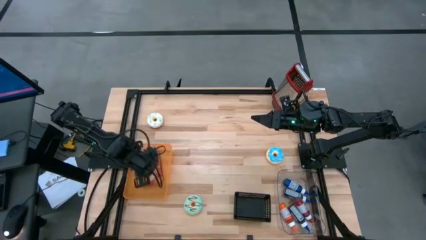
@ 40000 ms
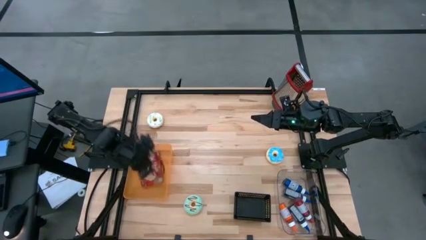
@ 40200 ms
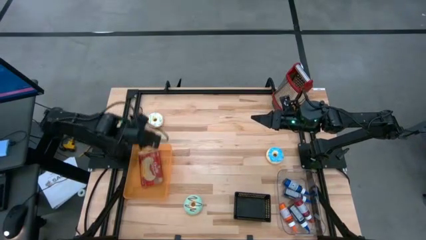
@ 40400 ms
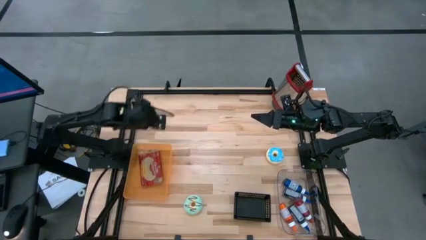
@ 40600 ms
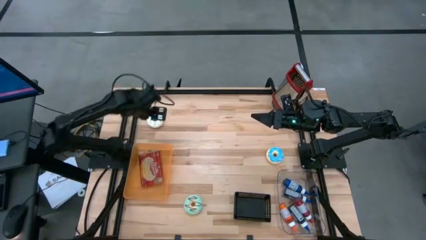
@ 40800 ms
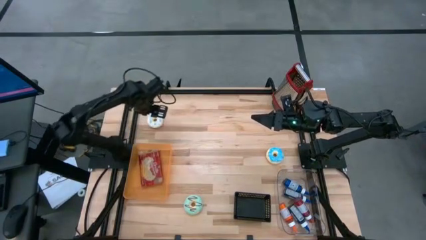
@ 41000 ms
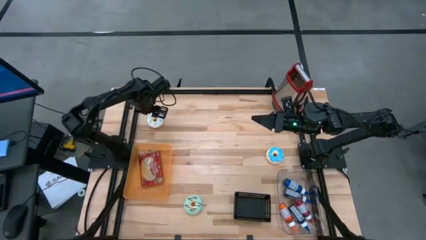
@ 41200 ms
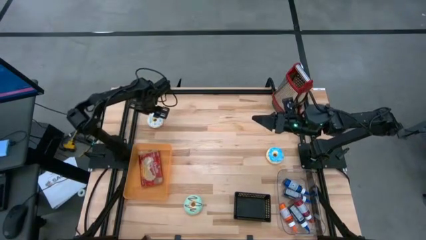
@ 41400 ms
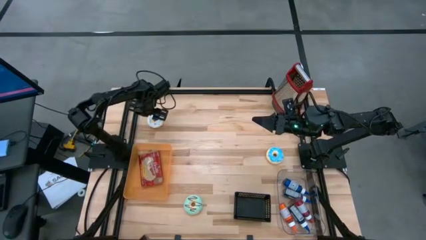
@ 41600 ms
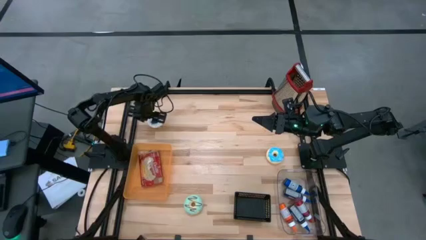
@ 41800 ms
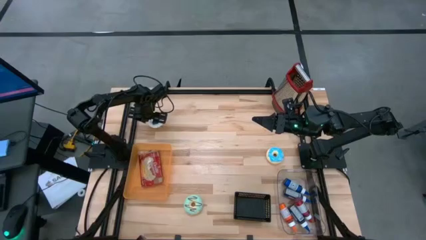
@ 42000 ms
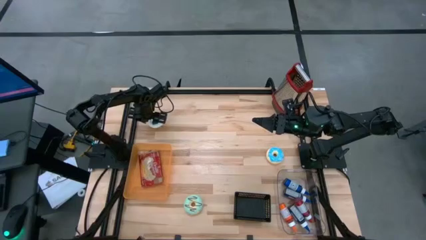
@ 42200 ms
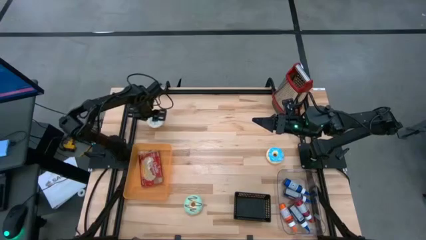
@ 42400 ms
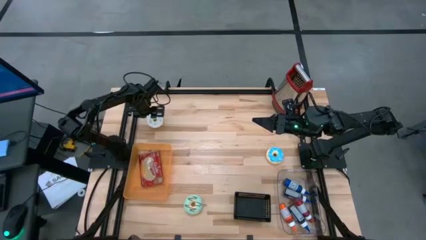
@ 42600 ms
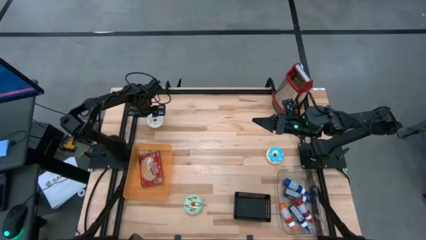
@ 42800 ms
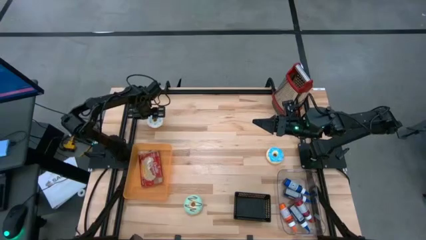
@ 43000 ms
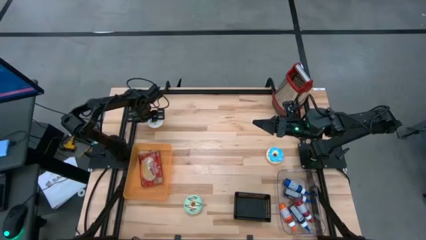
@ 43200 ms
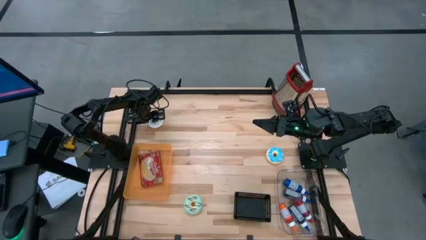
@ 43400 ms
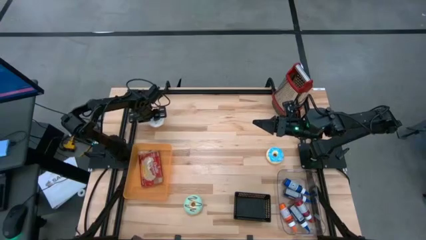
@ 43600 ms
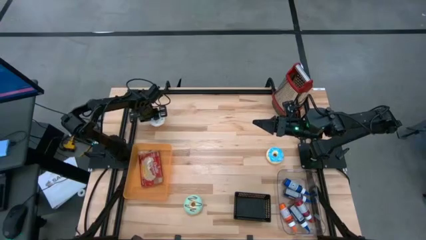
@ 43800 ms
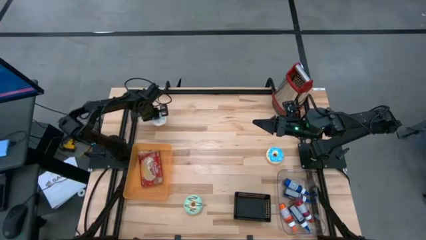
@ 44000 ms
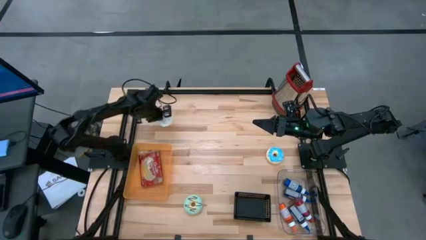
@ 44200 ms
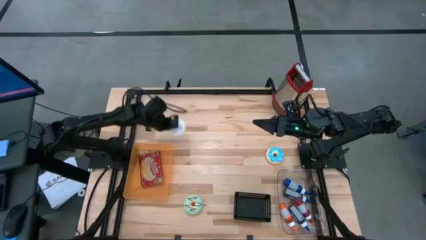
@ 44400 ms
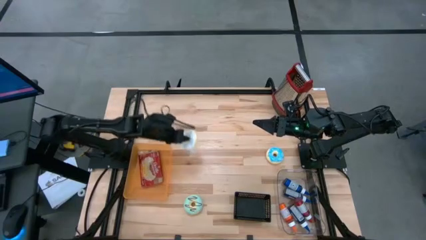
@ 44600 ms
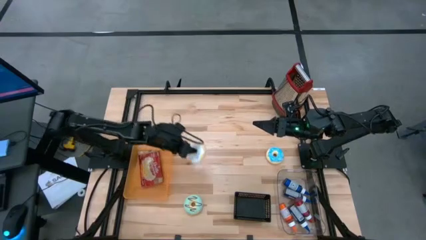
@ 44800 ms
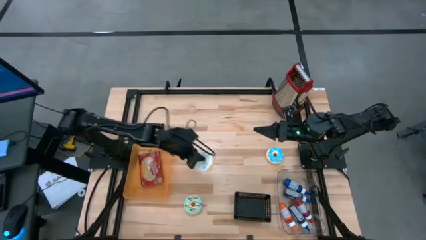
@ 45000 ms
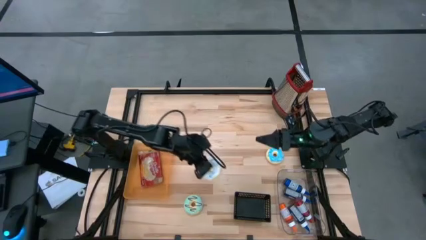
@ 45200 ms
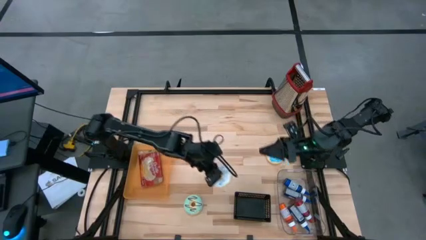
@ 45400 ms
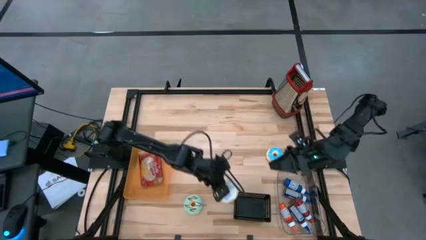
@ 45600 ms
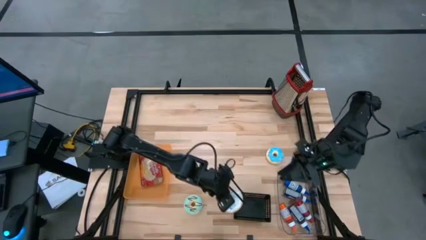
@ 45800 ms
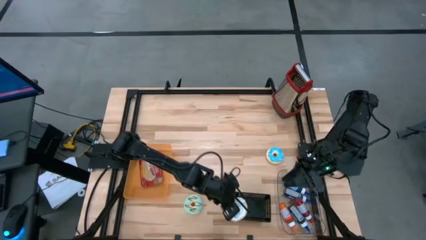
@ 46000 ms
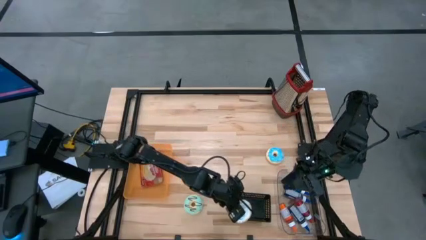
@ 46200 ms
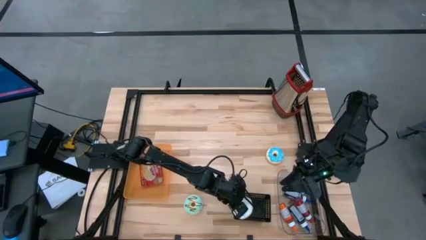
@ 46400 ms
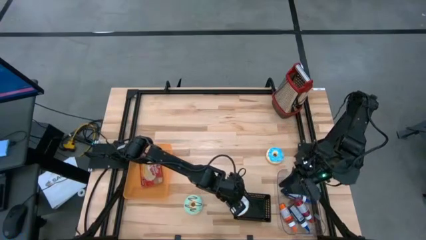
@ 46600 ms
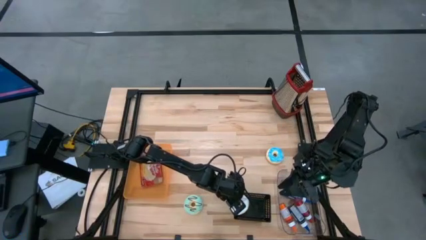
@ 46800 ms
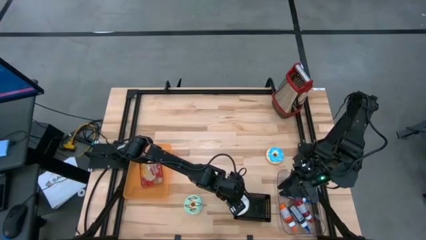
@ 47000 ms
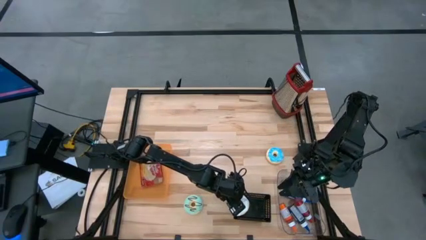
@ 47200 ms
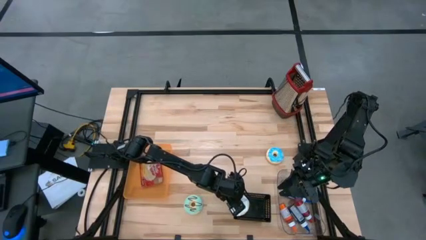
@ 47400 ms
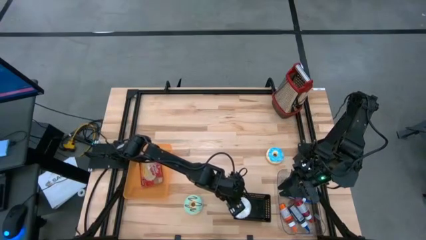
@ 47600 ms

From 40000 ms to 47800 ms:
Task: Pick & Place Food Item
Put the white donut into the black bin

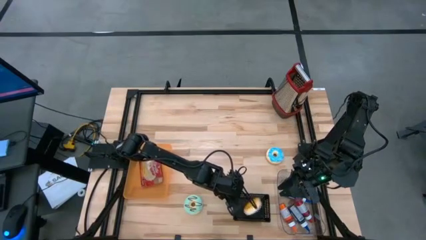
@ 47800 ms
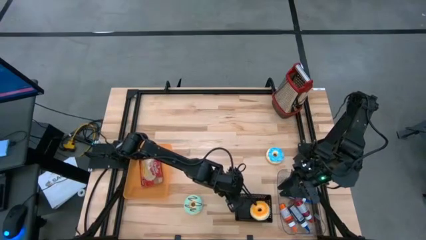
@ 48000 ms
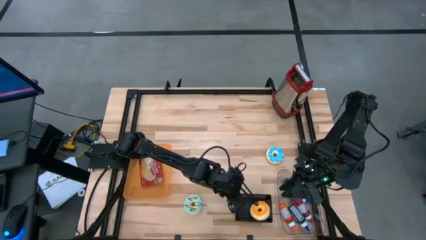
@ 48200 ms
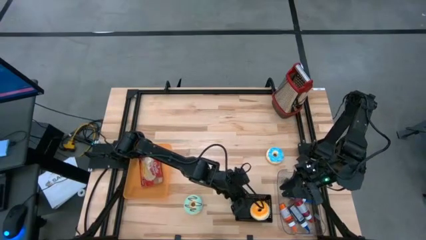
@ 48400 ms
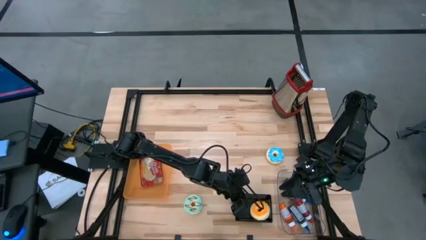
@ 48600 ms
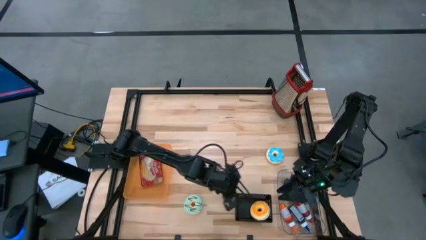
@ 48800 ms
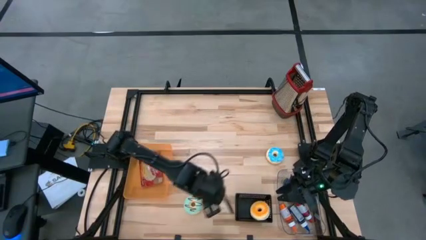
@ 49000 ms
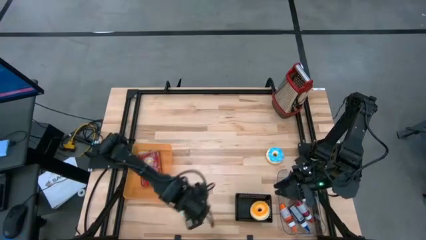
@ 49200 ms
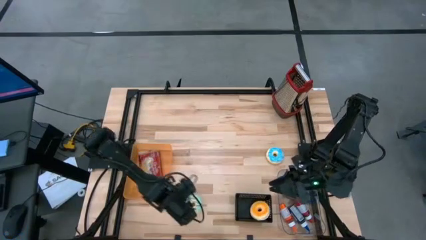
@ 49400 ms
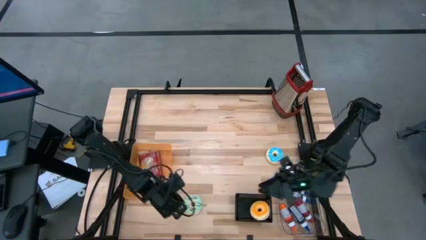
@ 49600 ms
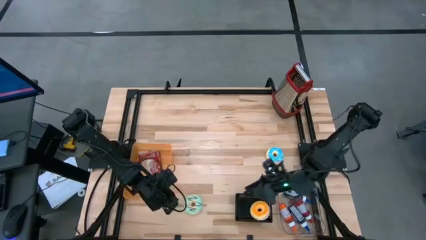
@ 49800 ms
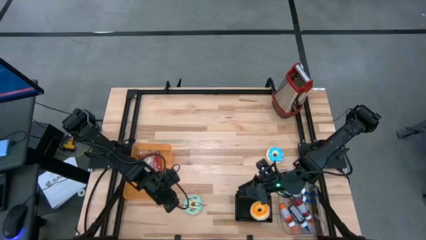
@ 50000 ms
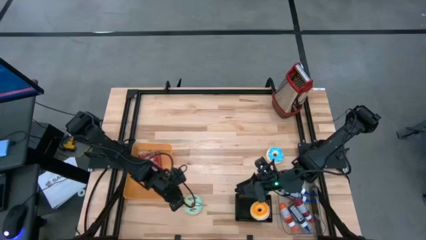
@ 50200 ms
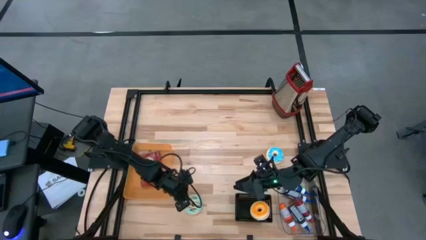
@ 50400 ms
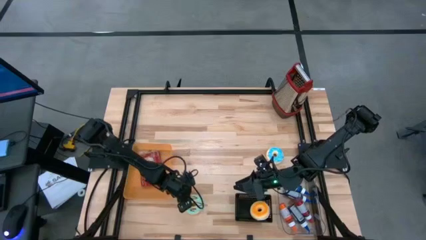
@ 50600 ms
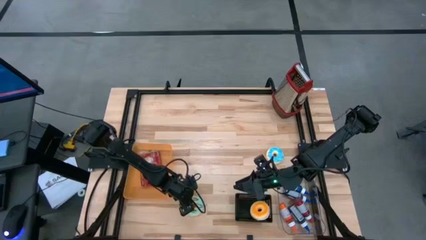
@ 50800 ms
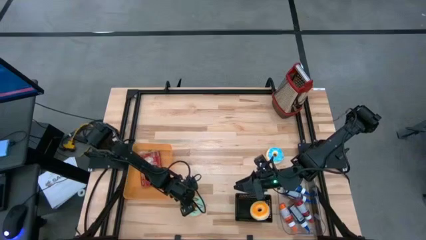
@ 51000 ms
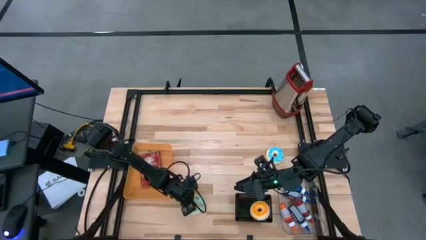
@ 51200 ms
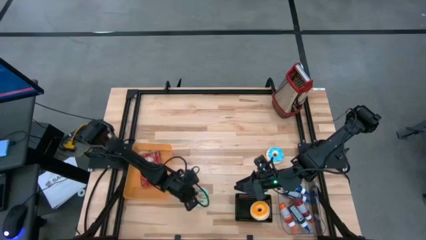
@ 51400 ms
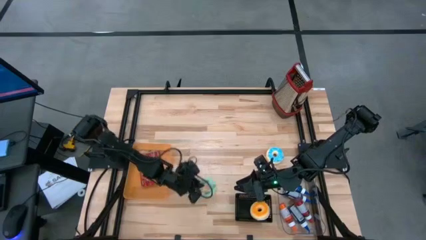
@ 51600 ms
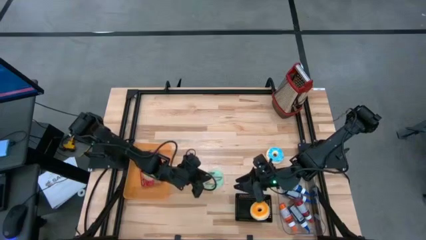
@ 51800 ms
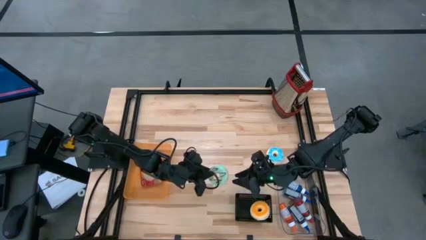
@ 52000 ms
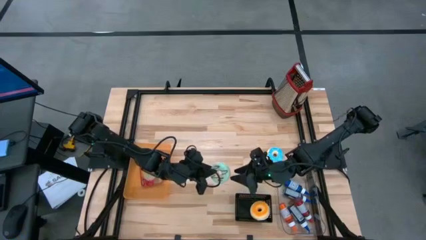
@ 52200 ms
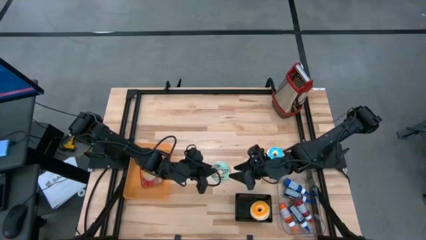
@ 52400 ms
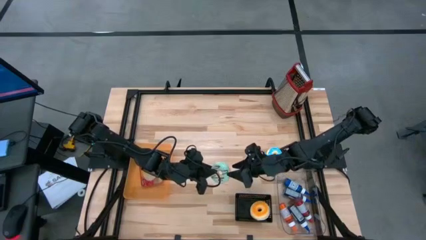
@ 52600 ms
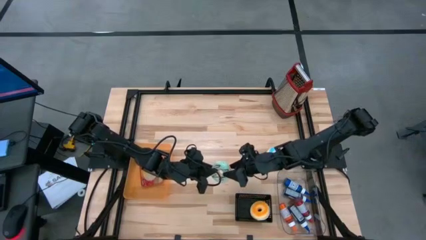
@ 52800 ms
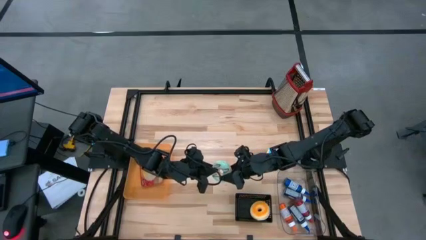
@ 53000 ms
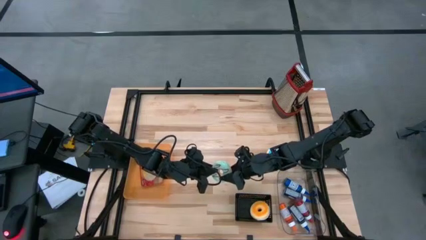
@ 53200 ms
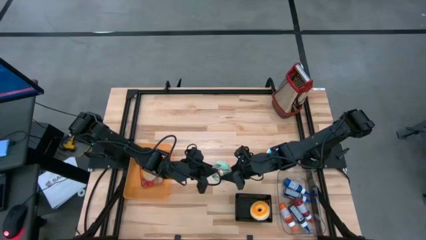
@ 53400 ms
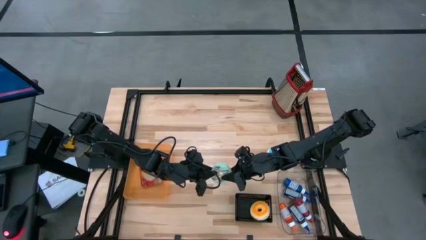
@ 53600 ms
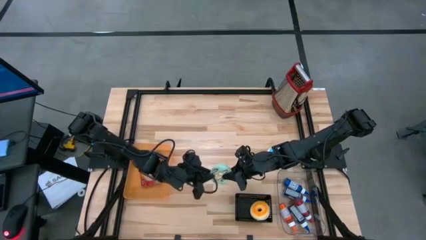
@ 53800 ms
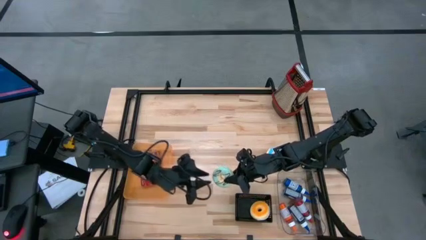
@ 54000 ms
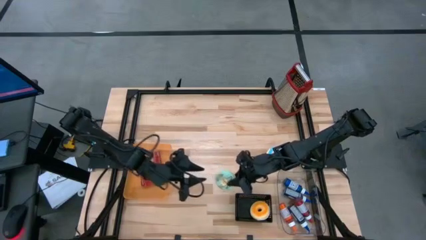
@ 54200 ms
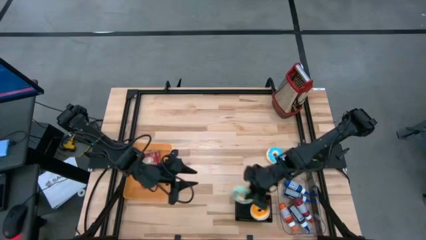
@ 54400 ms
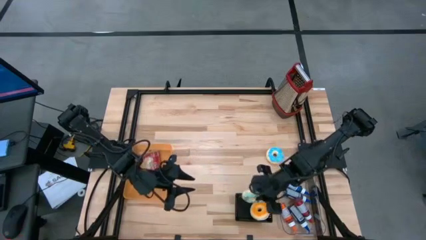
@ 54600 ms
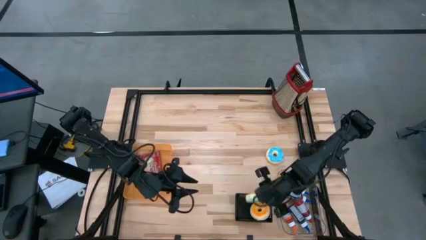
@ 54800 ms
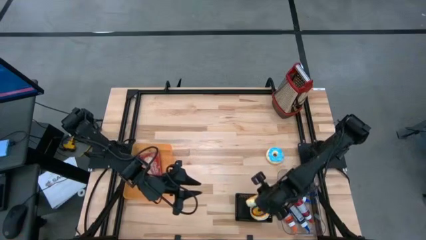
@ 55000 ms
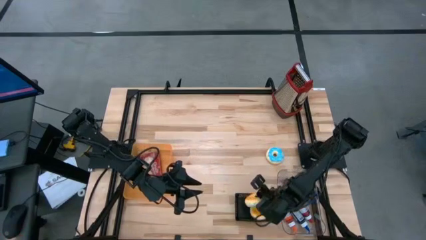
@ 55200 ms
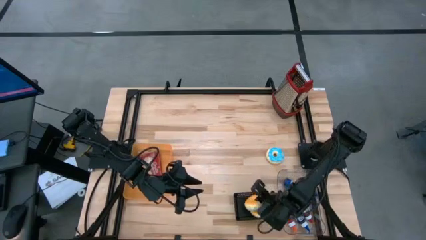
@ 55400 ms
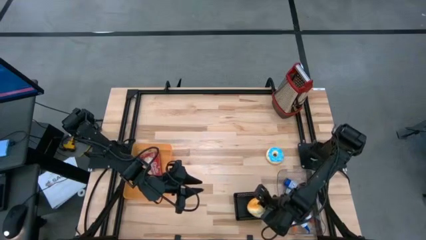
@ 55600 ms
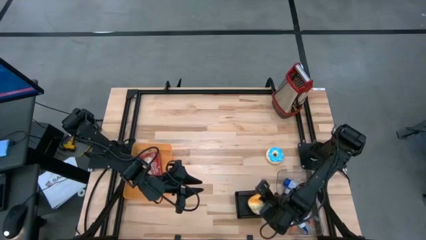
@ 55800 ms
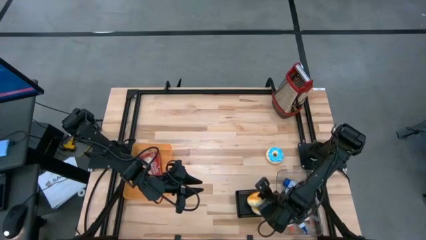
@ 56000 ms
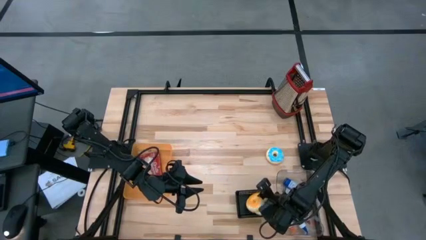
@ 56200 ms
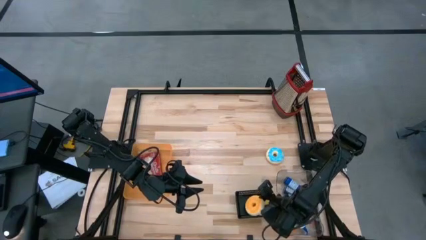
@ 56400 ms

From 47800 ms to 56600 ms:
Put the green donut into the black bin
